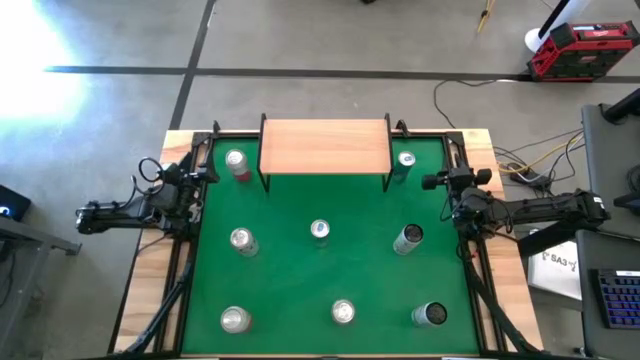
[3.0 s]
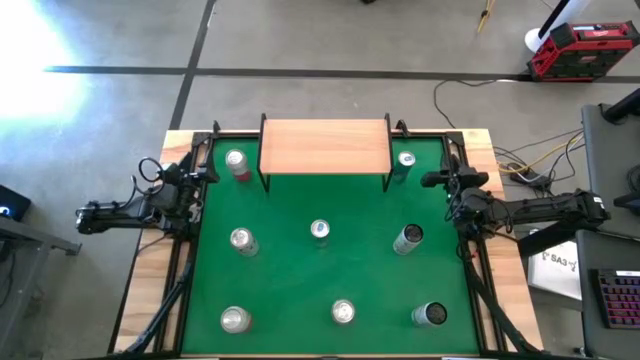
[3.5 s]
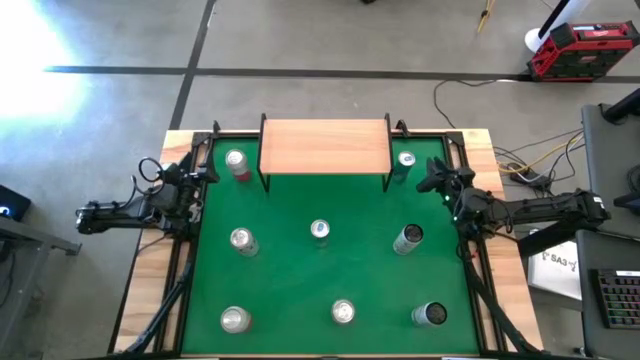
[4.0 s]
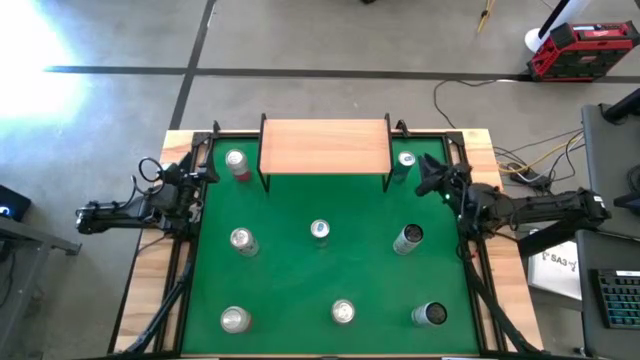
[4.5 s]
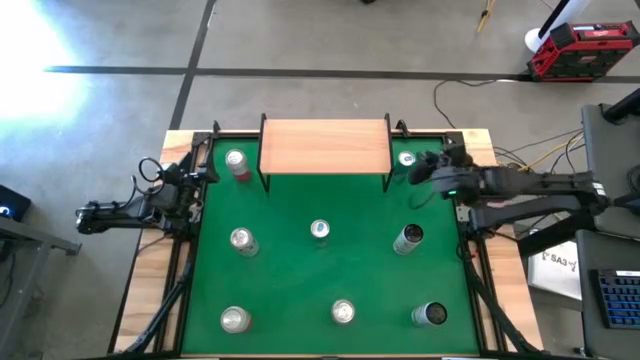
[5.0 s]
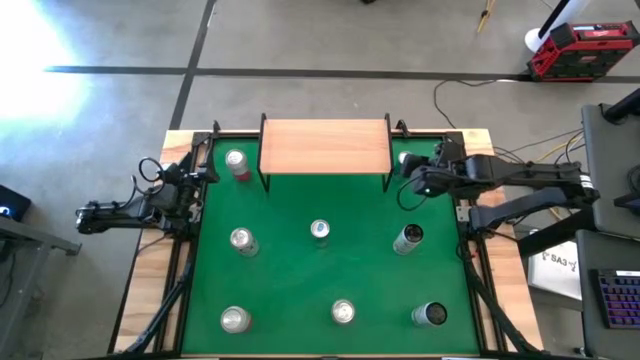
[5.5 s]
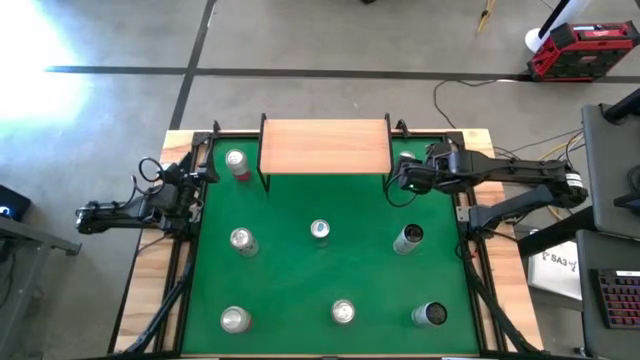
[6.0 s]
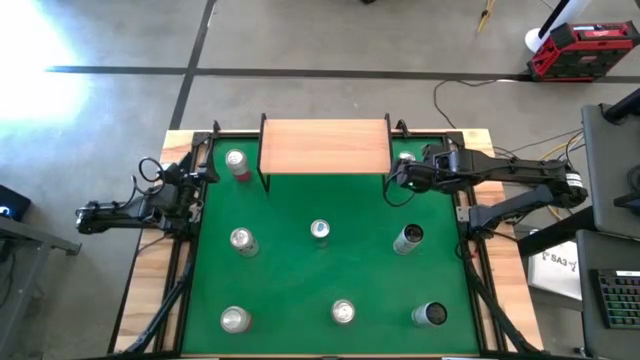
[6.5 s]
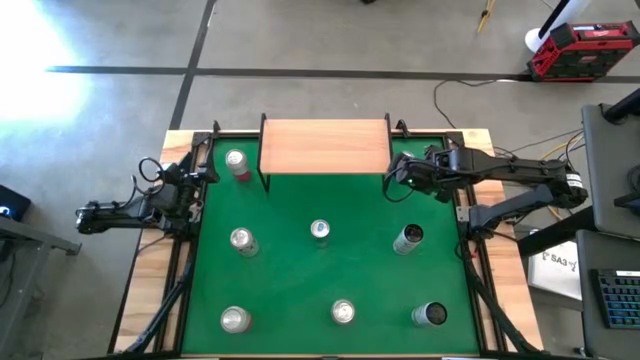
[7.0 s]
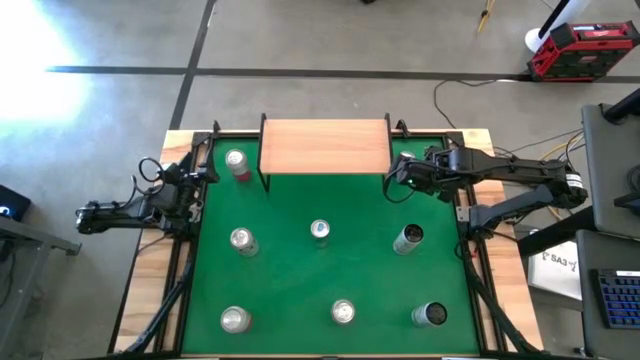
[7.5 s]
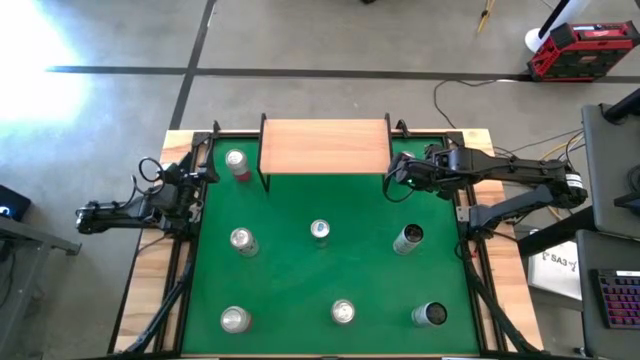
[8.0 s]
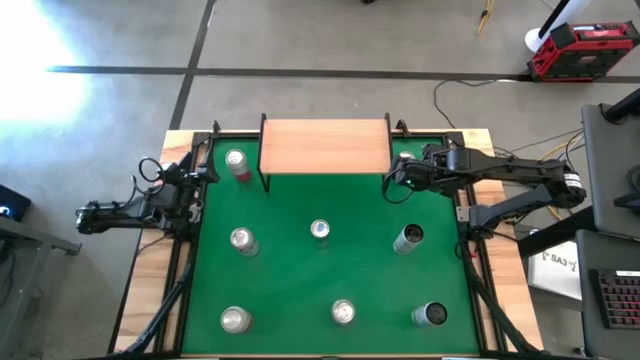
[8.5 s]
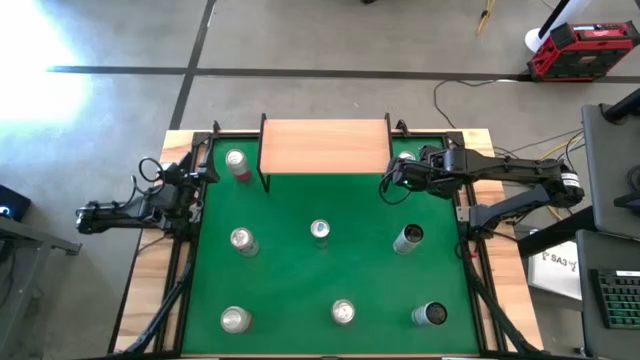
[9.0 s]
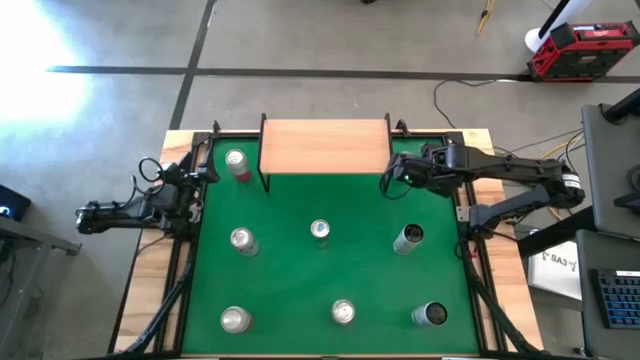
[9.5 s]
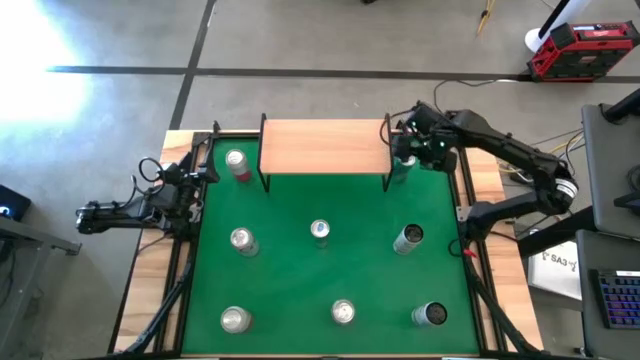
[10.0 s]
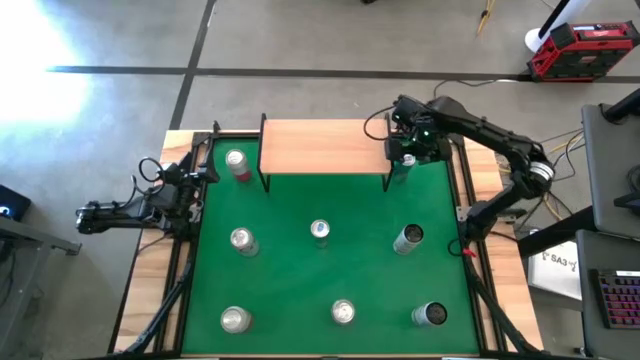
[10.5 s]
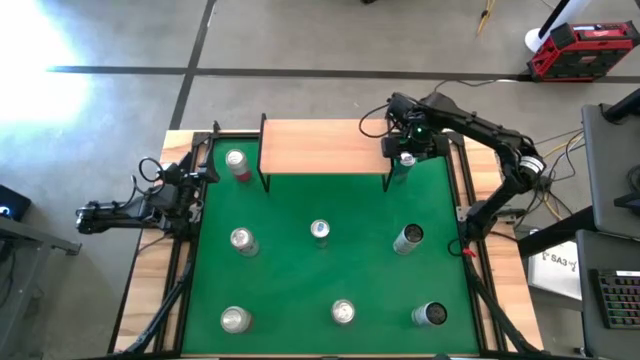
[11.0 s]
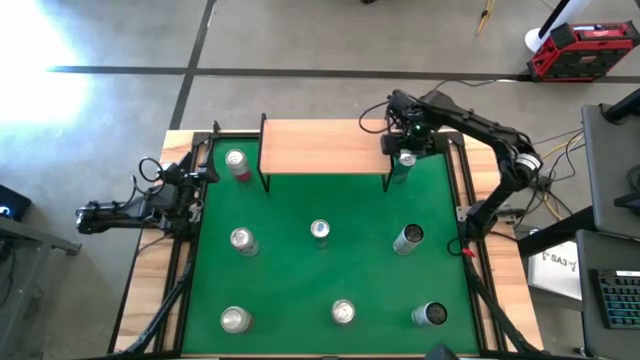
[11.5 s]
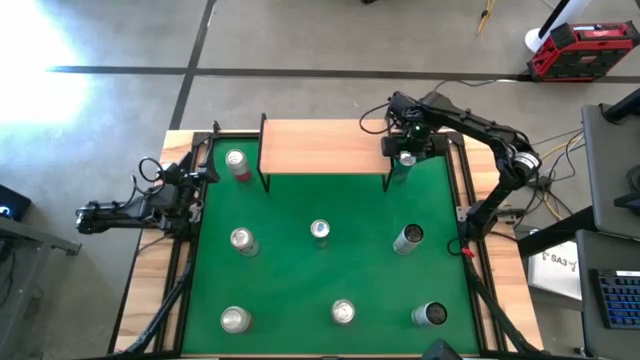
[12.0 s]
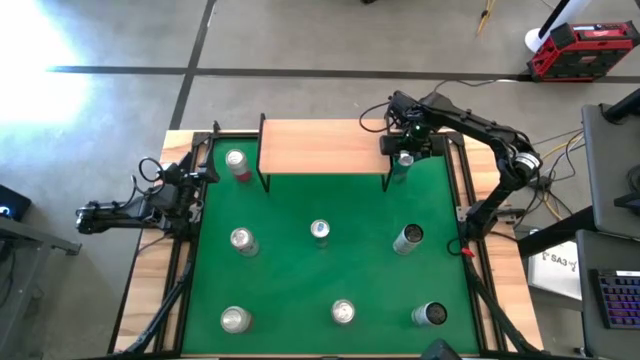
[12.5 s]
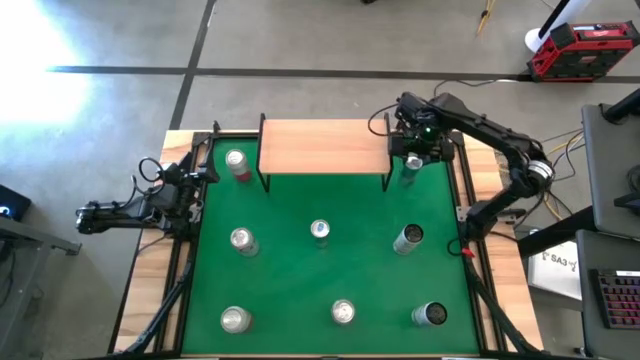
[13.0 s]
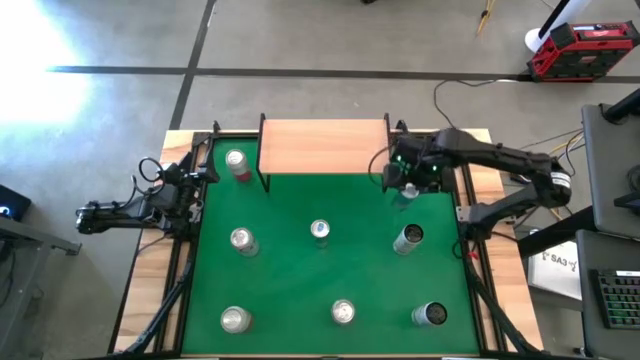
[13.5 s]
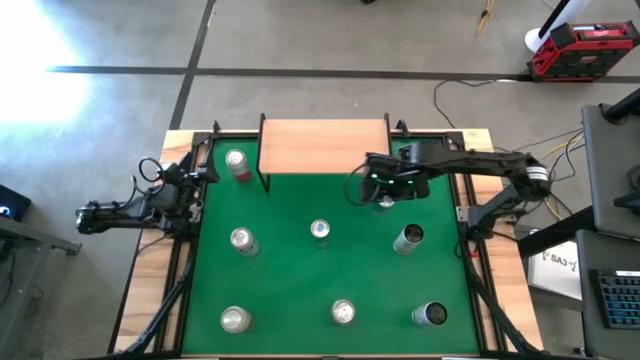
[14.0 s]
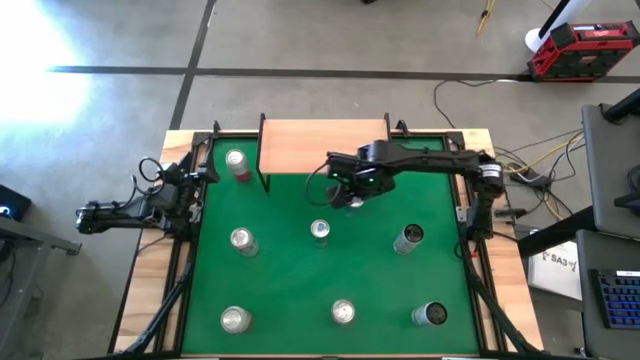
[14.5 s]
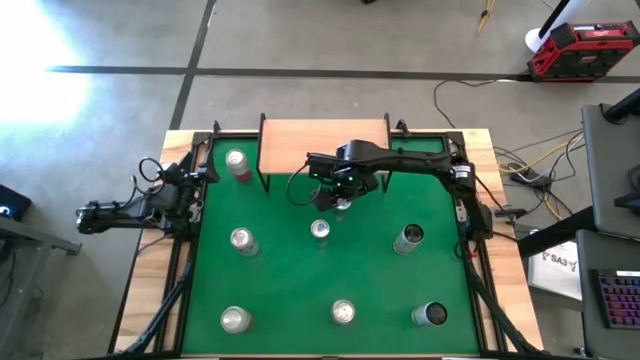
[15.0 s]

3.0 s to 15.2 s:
Task: Place canned beverage on shelf
Move the soda cans to the center of the table

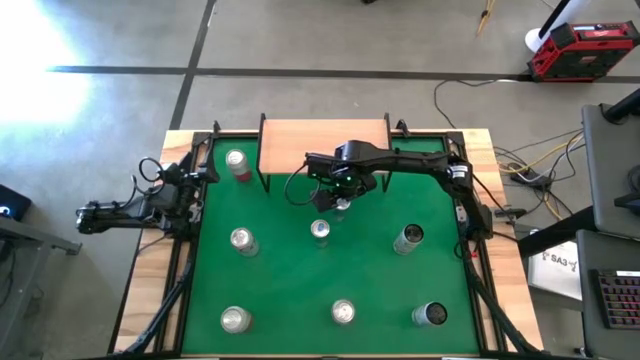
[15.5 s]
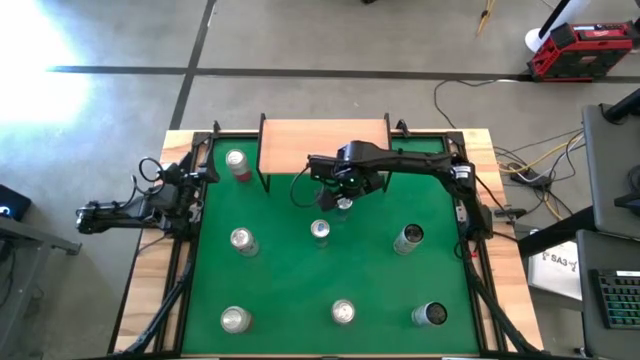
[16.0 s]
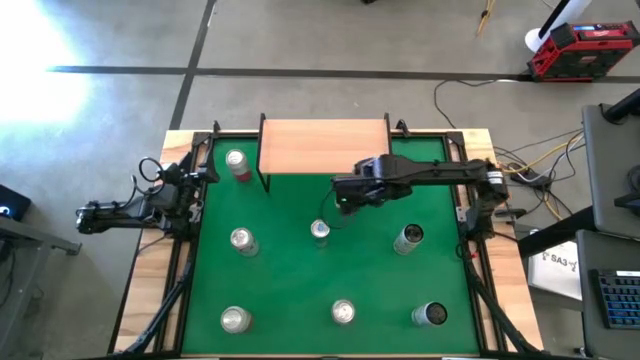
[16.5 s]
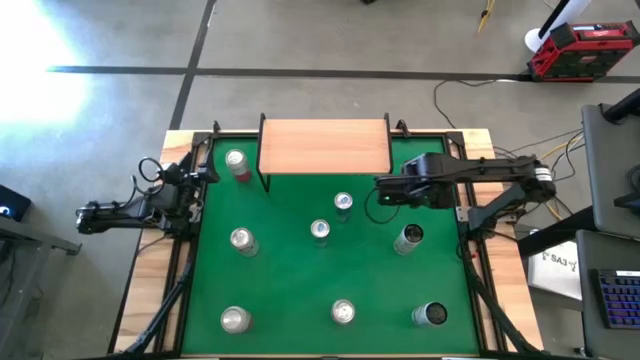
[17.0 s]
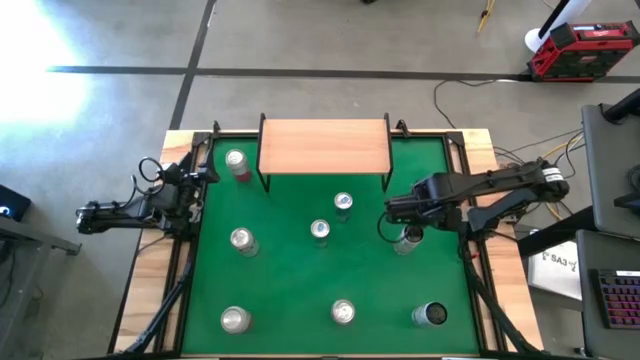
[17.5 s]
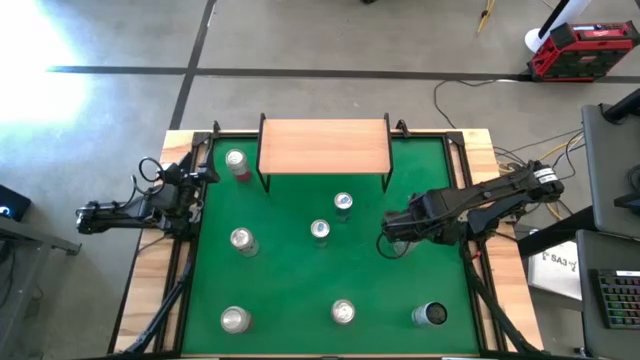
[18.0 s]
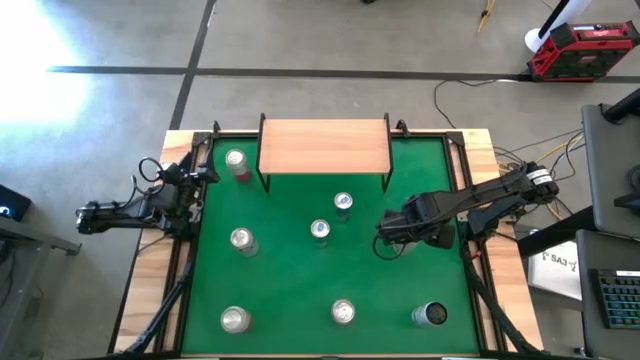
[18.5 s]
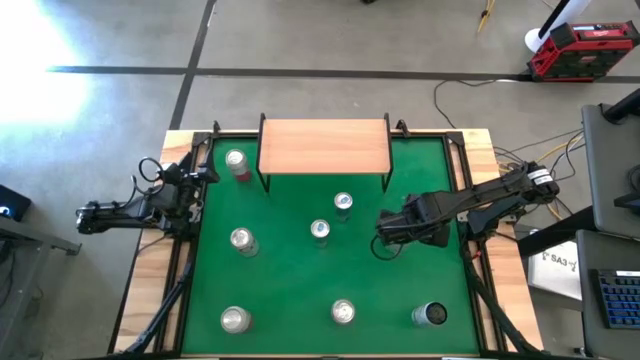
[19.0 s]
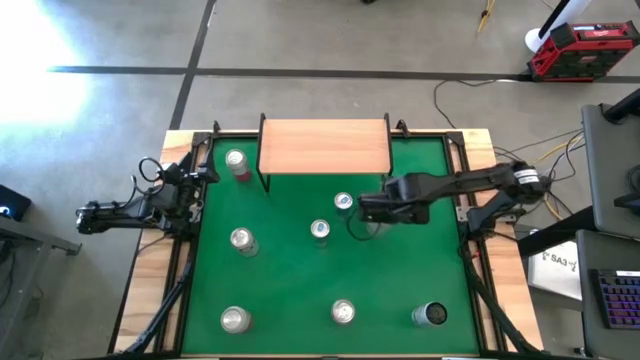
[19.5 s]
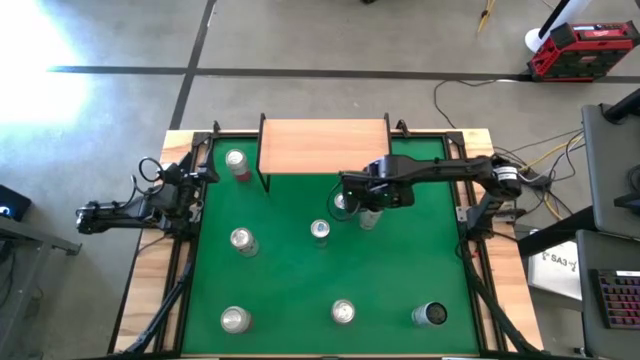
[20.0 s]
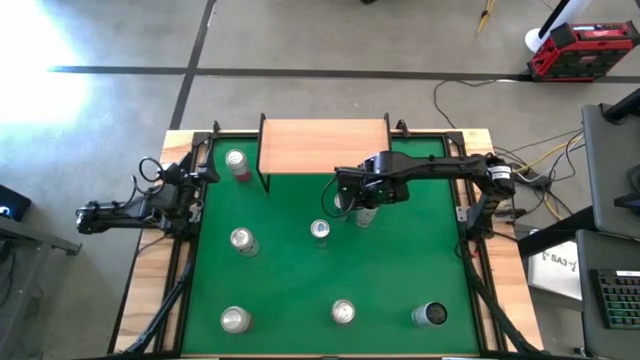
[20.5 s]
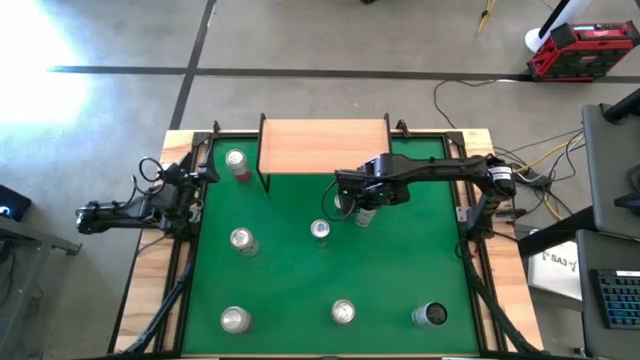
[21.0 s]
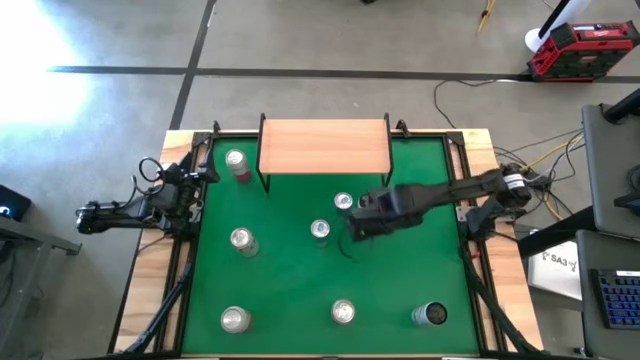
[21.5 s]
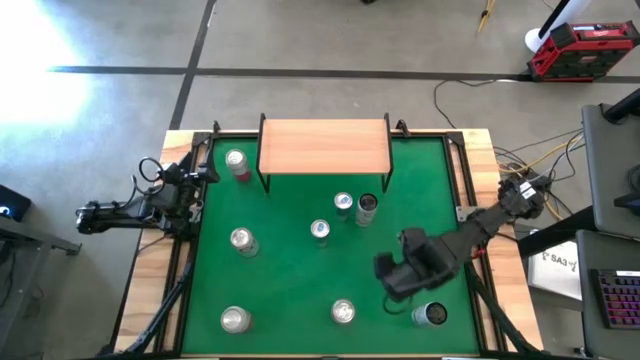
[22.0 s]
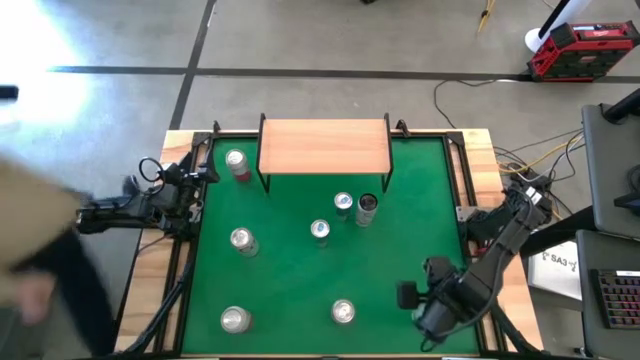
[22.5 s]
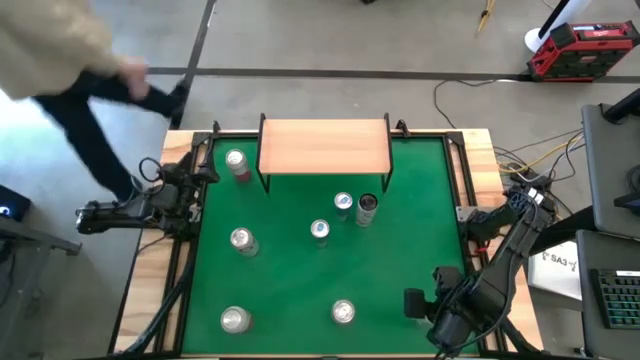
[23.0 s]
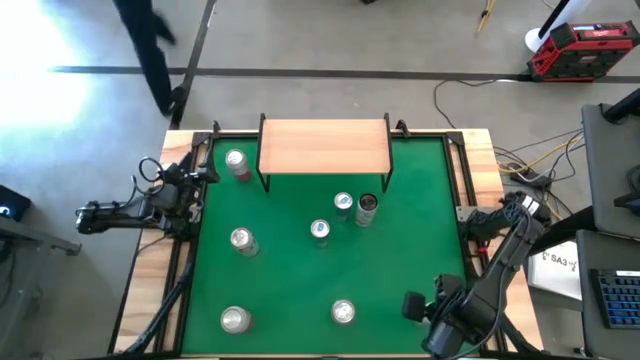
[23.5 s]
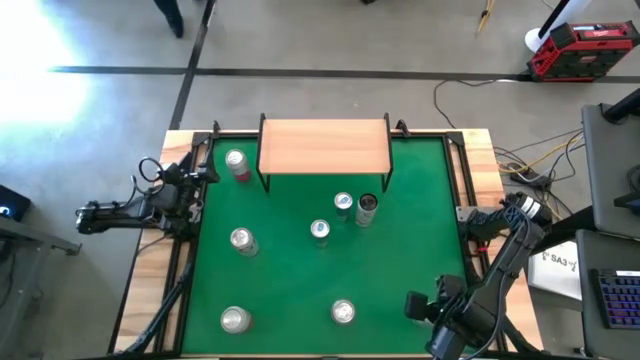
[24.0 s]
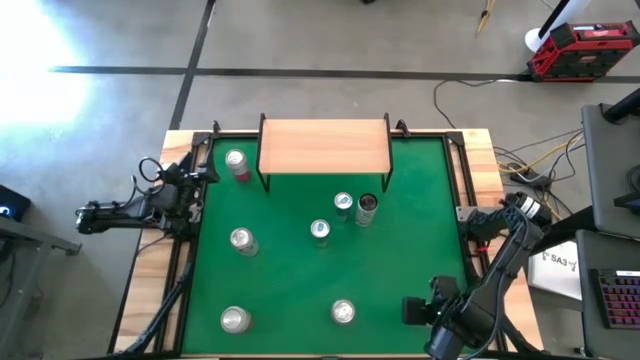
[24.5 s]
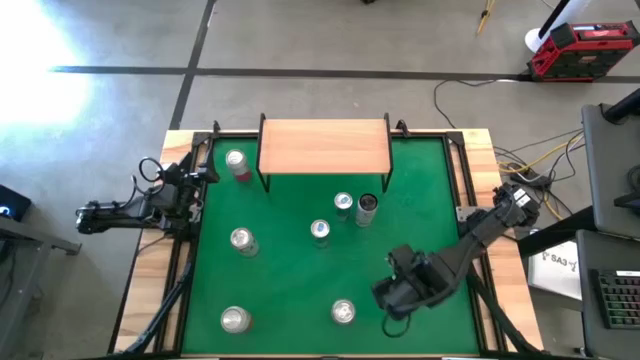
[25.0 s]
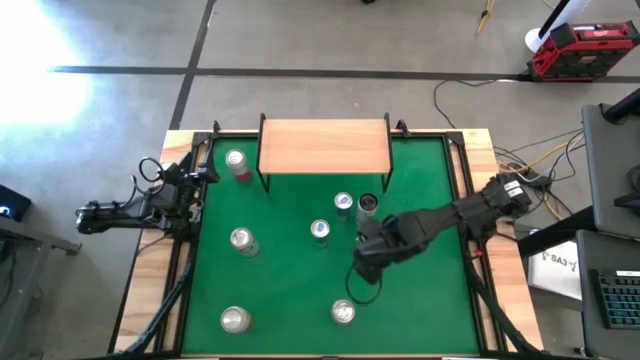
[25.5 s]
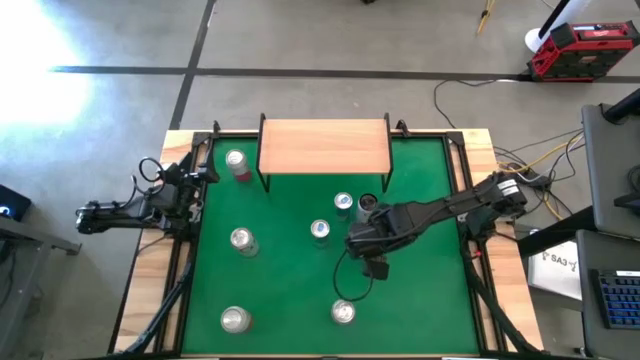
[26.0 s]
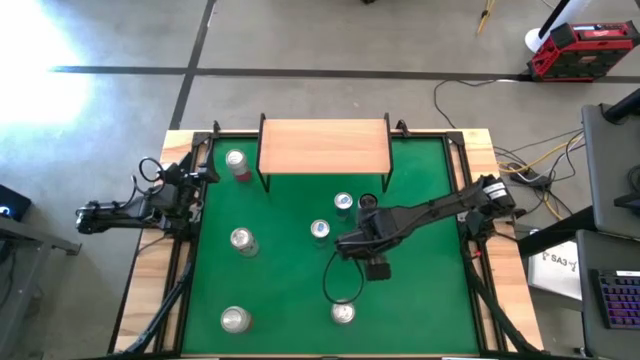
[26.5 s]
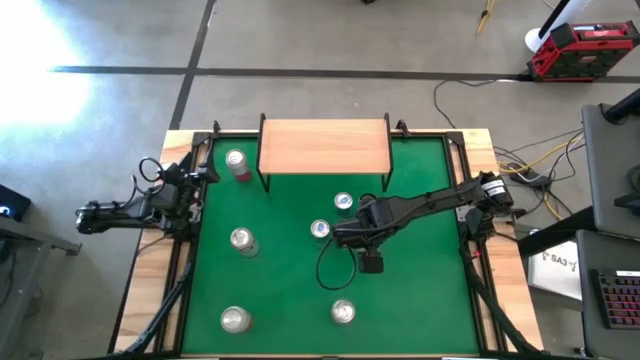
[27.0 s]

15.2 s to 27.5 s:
Move the soda cans to the center of the table
